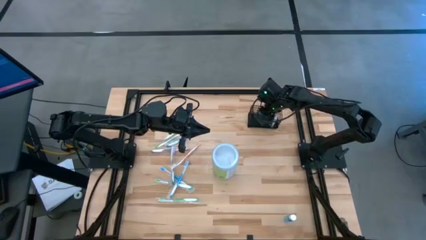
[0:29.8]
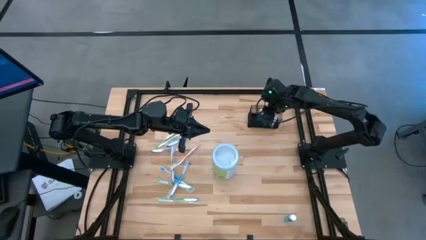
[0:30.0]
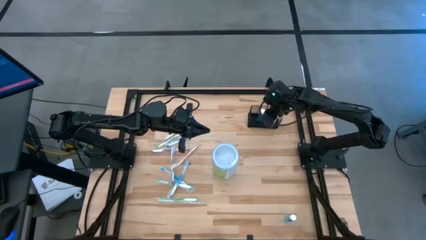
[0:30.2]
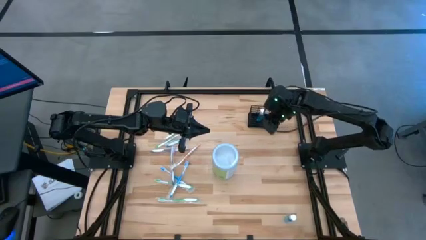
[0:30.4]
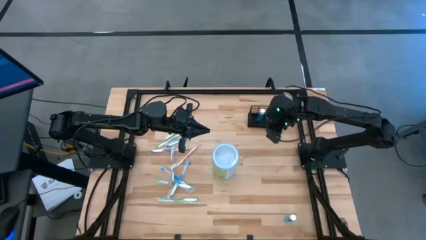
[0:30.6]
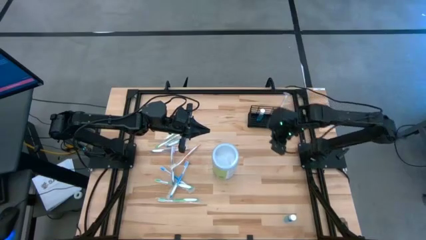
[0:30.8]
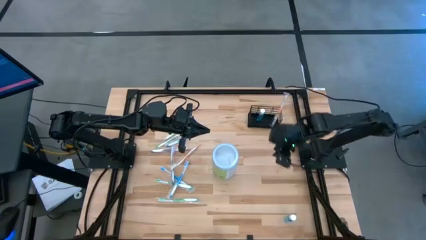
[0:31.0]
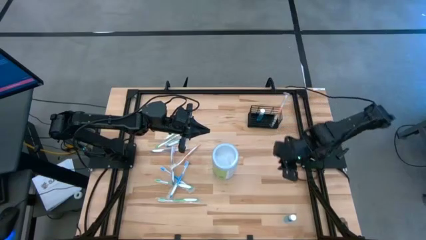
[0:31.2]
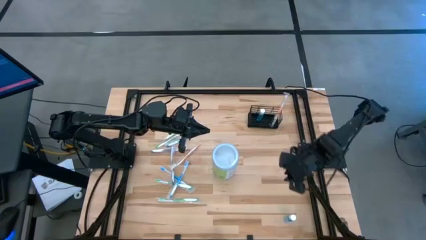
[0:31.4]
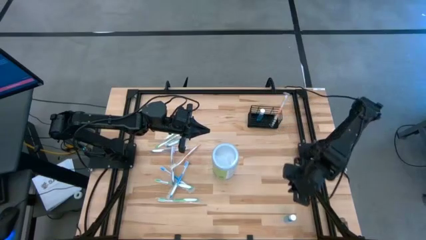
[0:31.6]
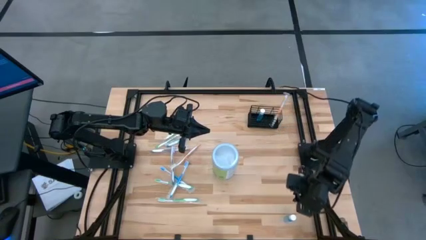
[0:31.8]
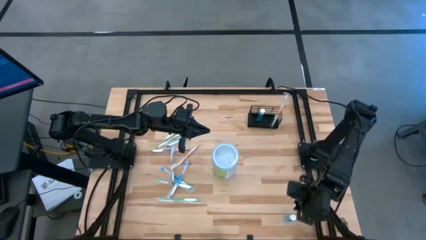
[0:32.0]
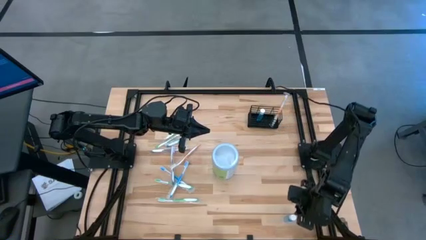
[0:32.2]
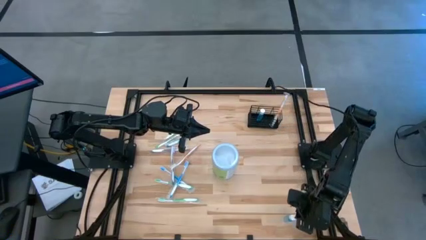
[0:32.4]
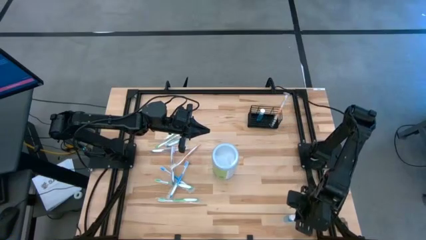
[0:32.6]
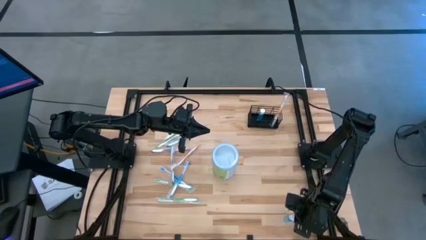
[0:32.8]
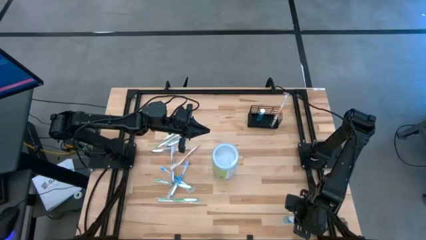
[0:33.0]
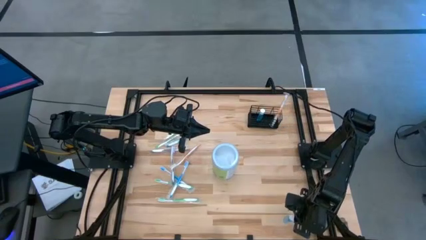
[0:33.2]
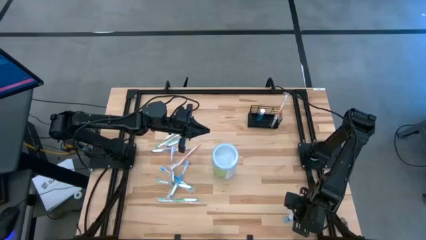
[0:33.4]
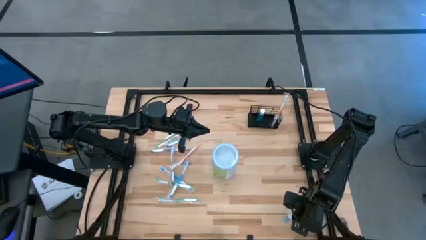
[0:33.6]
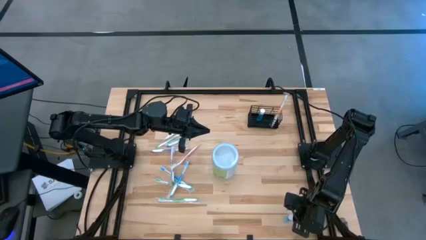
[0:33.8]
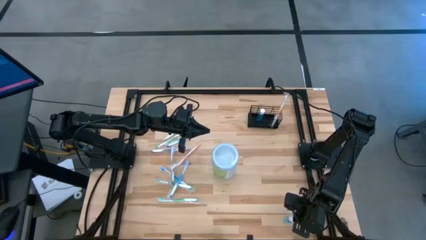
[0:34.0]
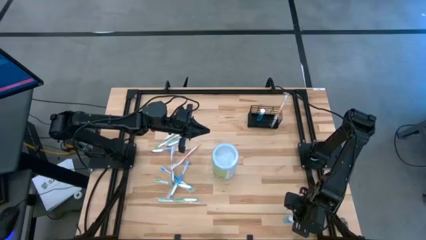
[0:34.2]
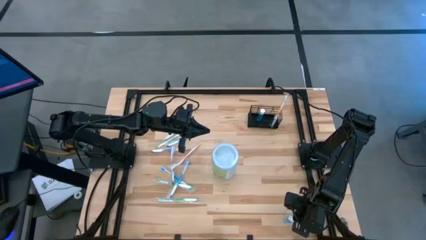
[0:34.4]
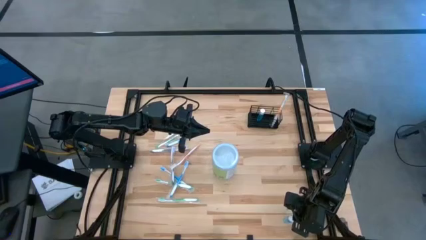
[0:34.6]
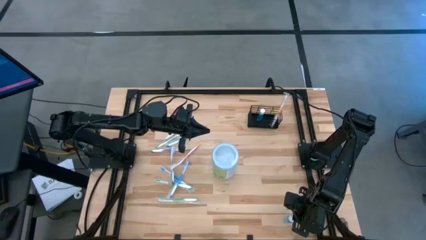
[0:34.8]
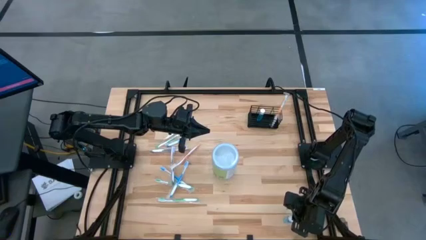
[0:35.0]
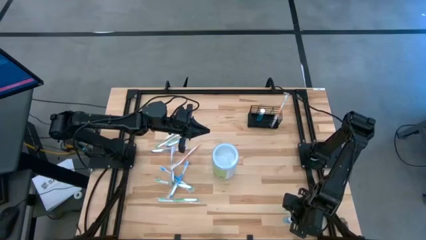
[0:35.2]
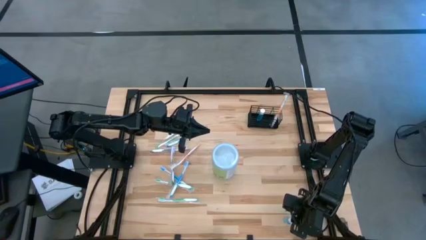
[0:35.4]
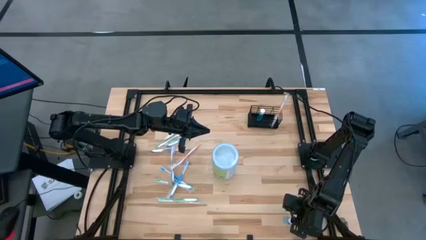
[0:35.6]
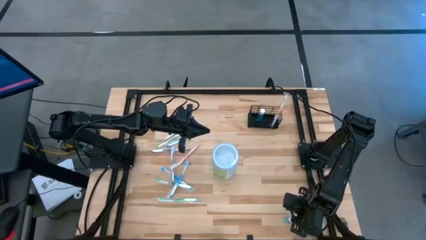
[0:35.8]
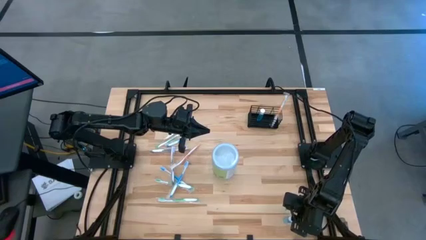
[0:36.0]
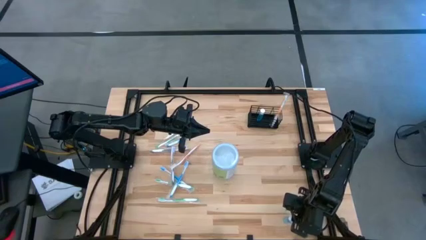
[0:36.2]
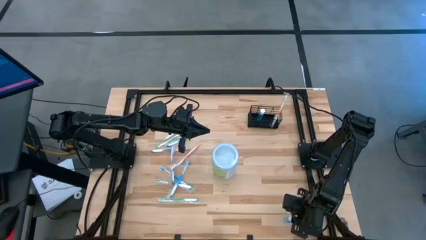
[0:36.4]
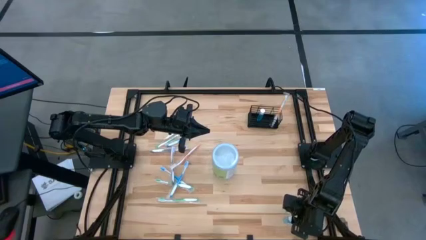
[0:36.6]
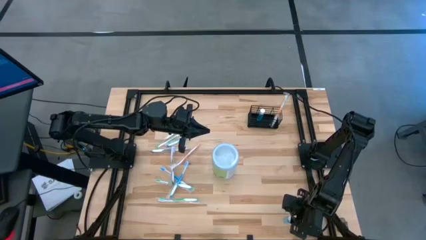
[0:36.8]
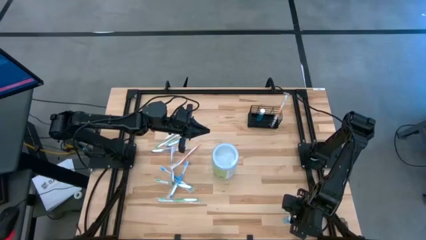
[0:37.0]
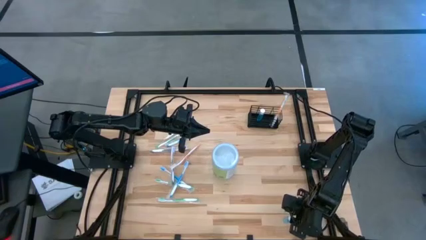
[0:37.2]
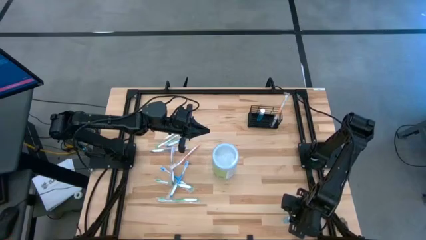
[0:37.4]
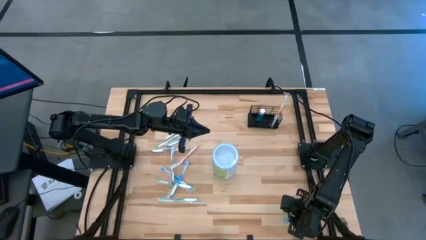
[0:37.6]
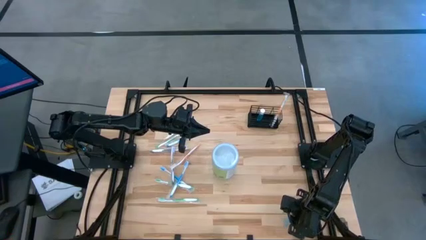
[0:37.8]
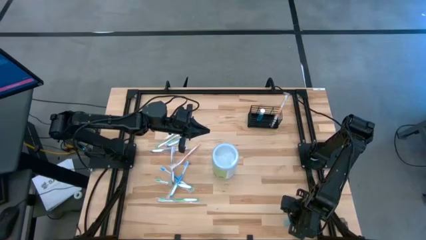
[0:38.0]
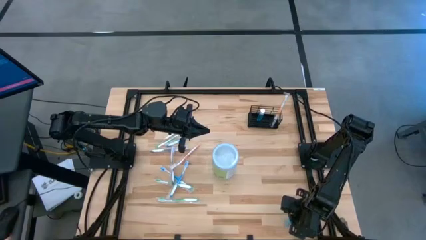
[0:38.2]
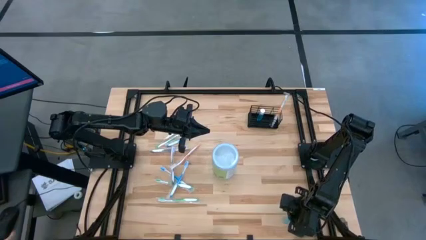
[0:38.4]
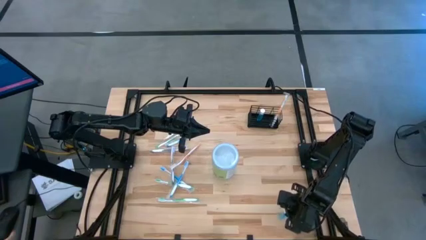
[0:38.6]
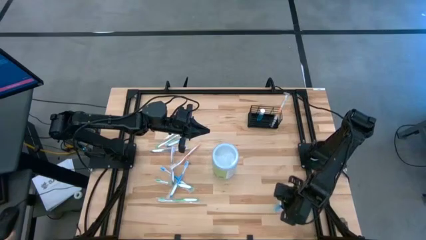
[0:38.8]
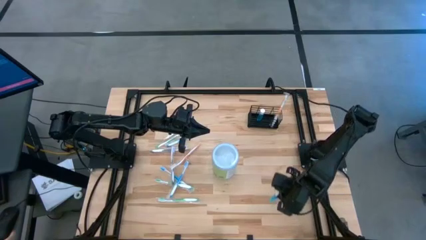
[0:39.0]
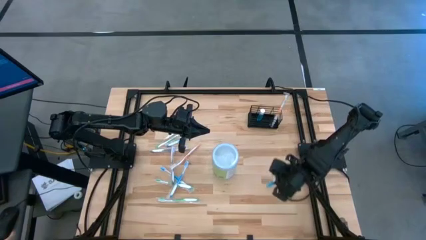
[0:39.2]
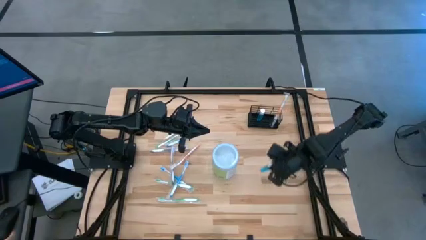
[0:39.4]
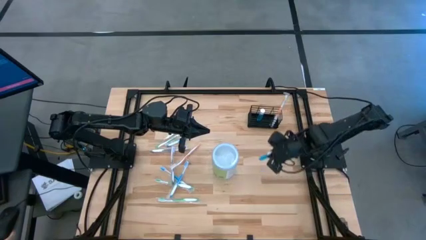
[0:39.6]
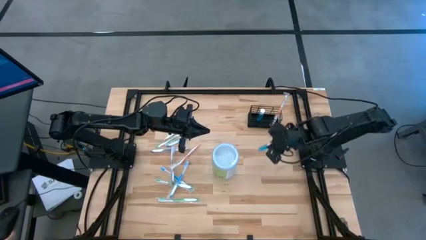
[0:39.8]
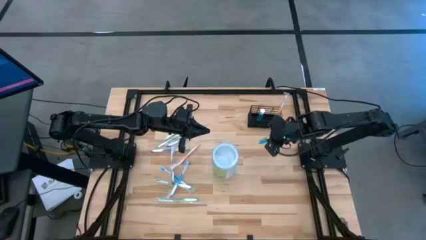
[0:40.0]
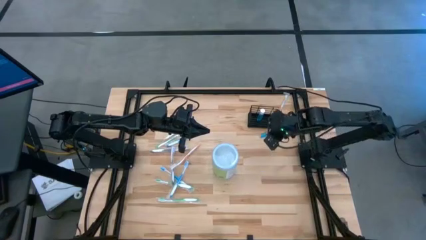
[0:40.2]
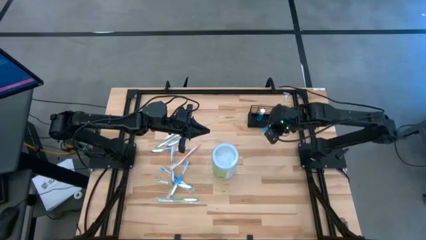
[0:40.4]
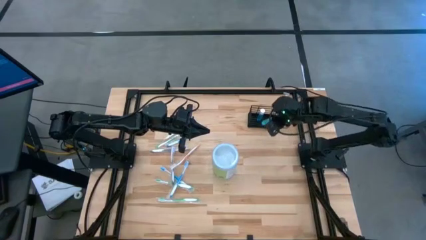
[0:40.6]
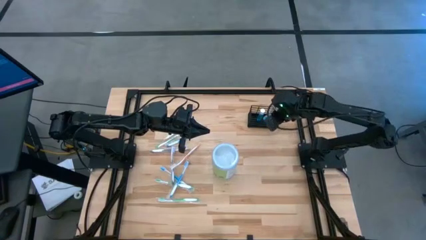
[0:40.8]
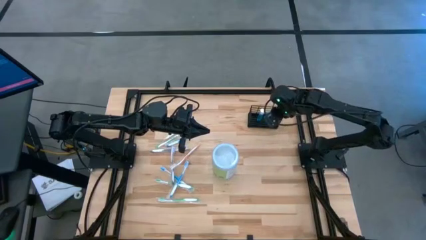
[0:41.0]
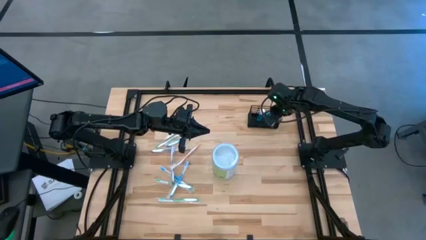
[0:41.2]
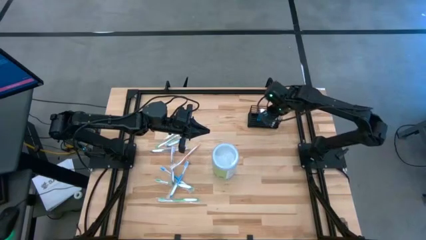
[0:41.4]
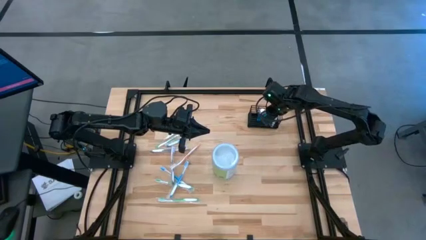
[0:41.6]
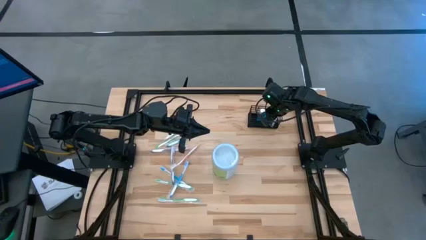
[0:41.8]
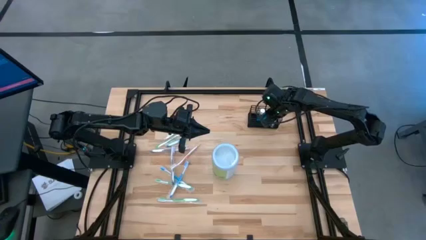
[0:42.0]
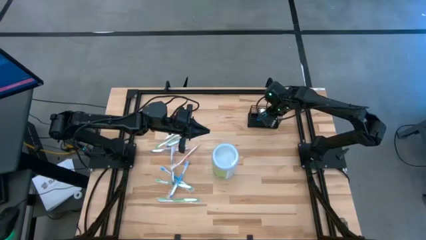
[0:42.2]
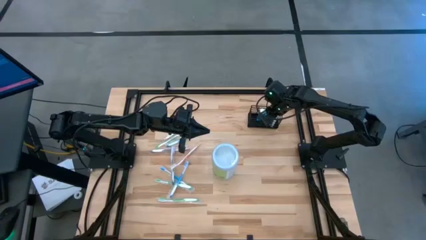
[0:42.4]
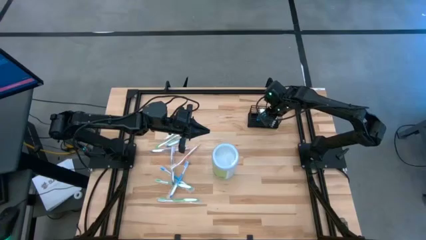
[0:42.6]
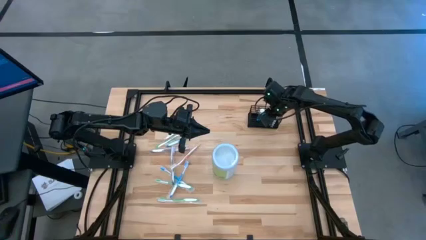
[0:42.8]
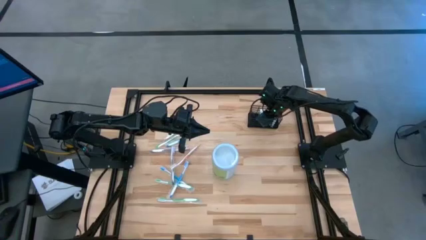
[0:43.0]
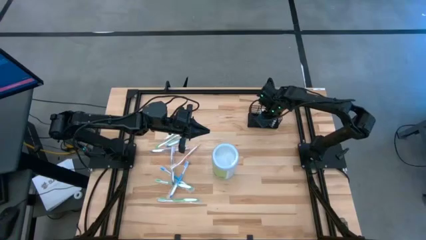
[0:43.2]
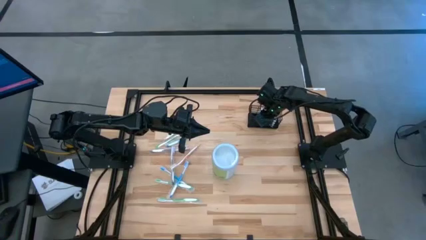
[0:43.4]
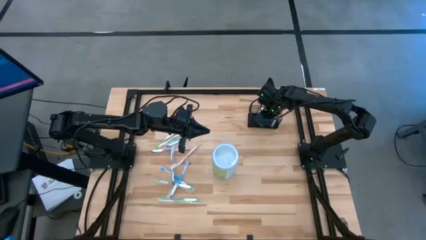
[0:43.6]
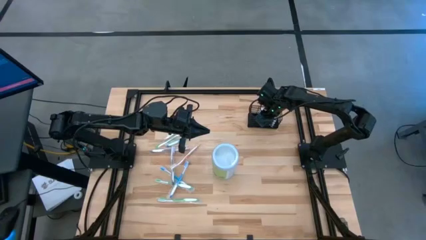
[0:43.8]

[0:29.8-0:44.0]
Task: Pick & Place toothbrushing station
Put the blue mouthwash into the wire organizer
